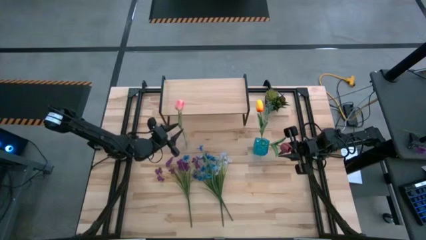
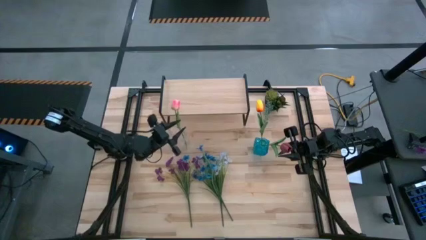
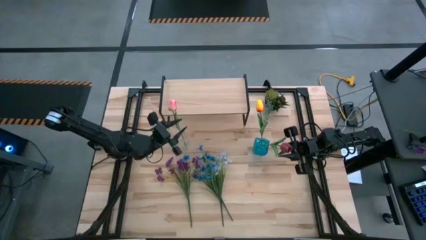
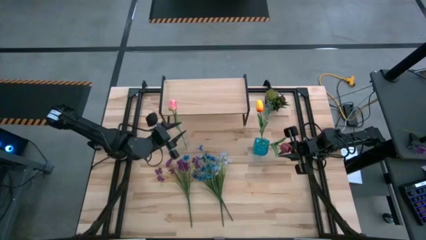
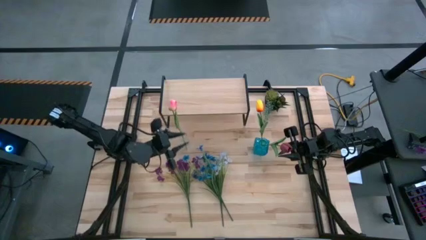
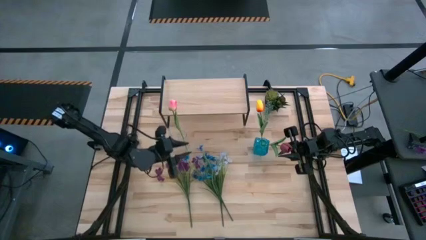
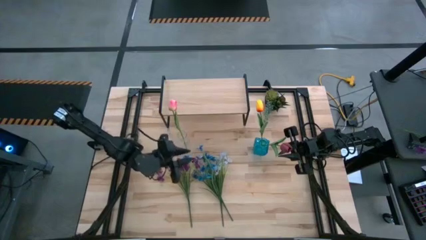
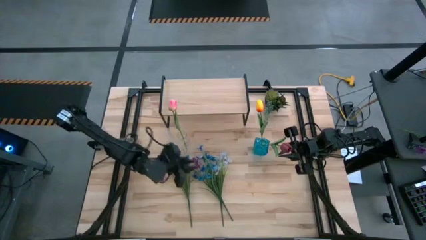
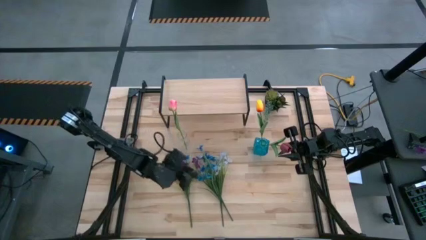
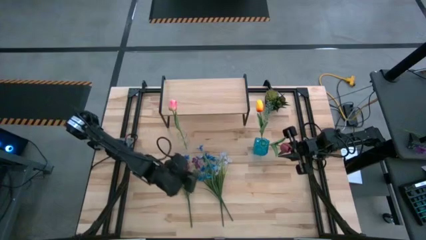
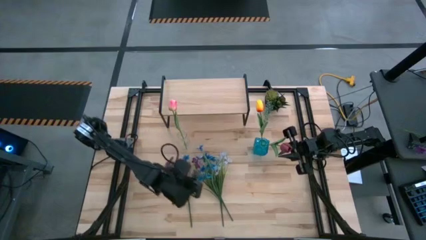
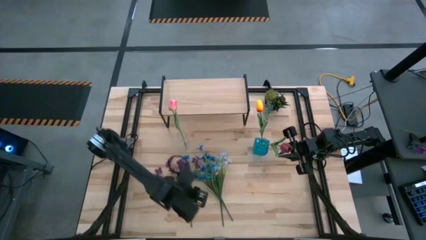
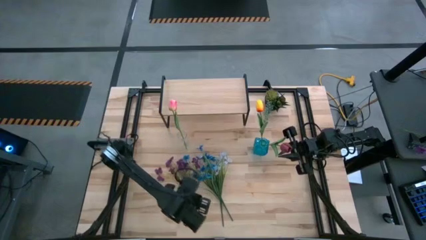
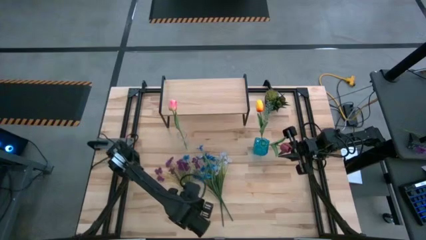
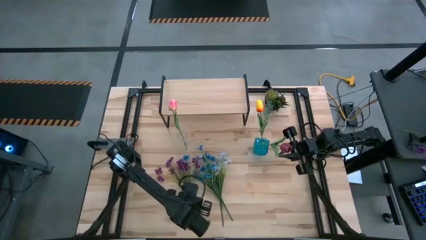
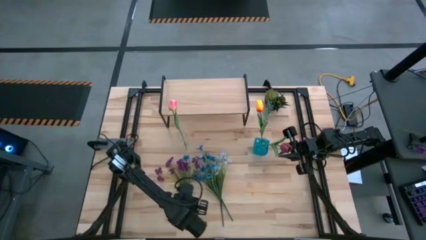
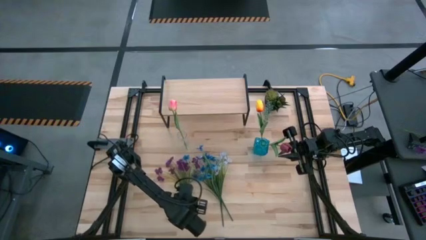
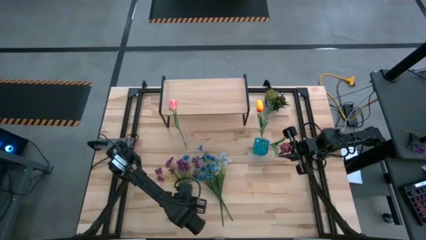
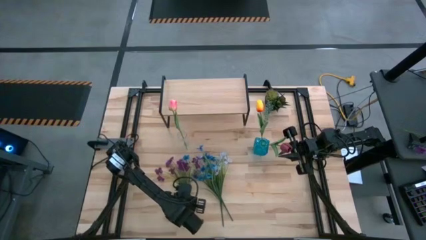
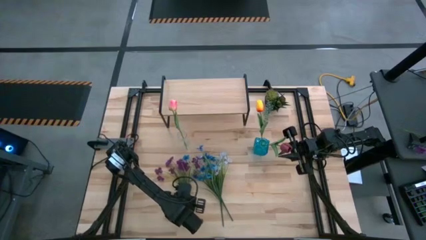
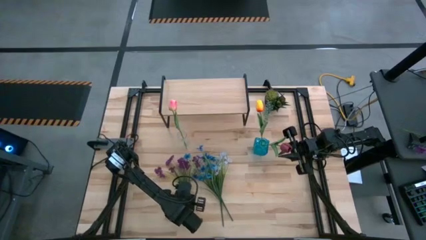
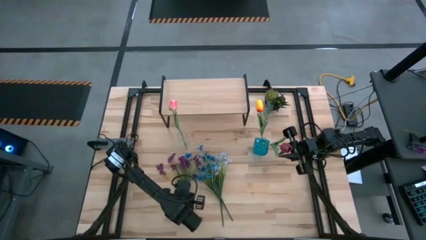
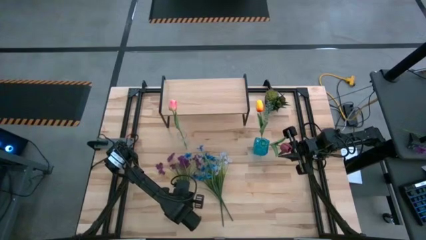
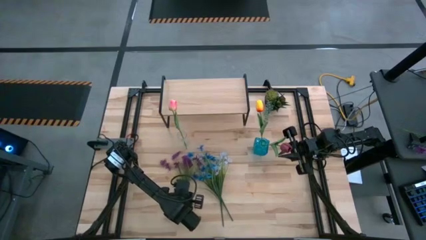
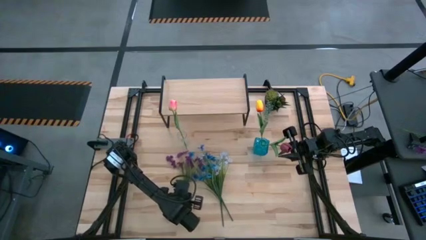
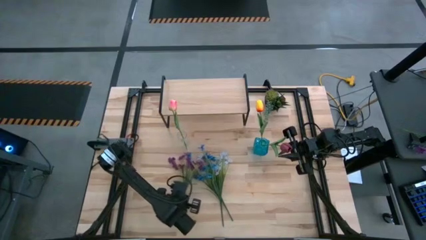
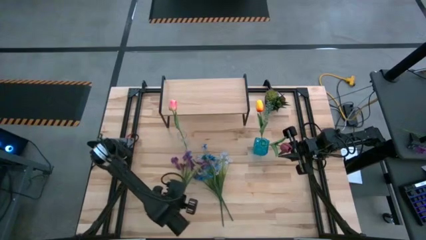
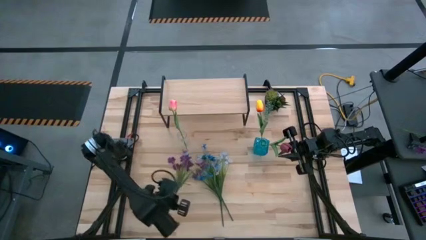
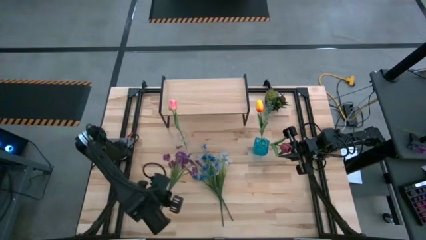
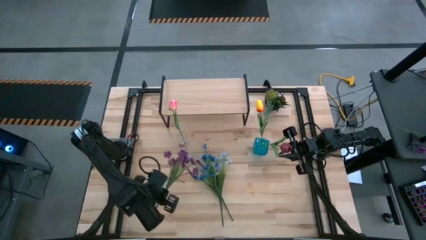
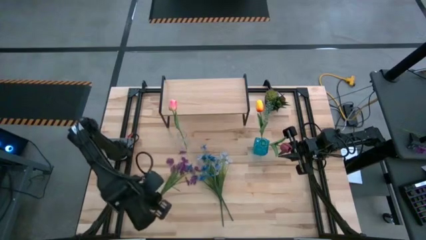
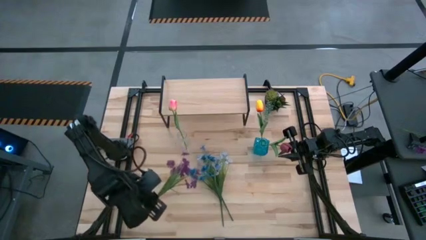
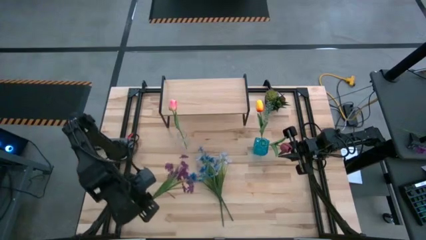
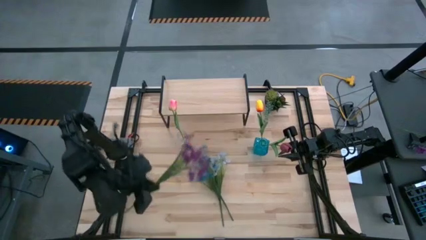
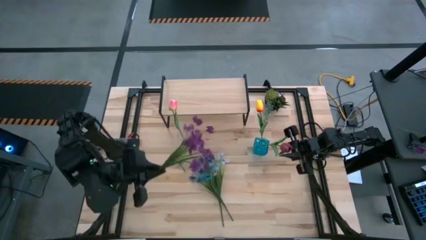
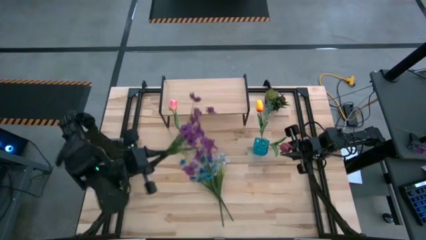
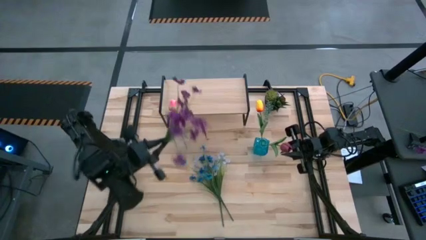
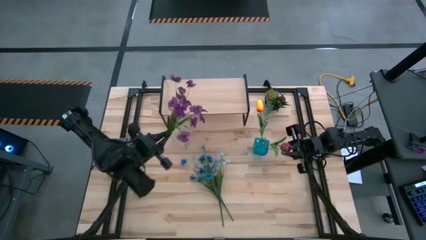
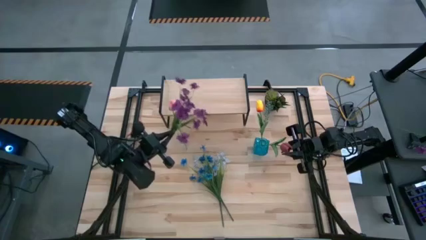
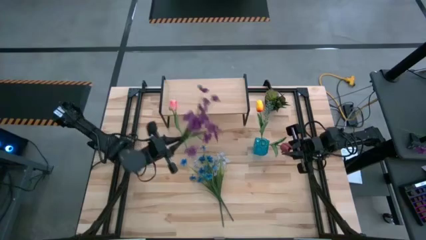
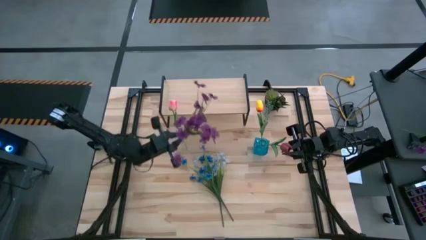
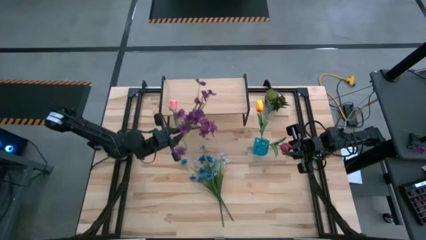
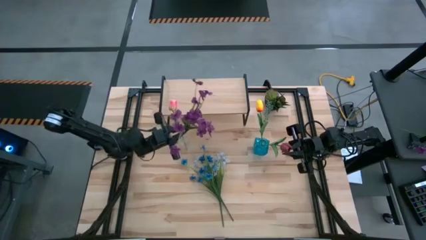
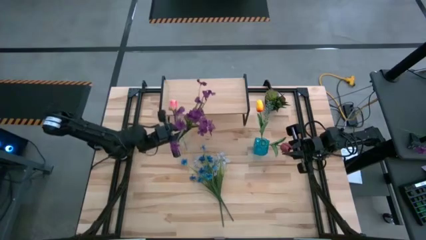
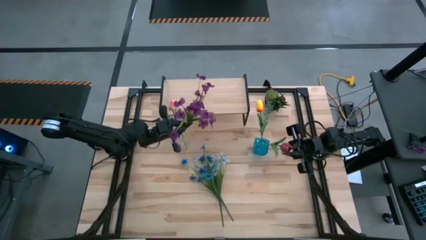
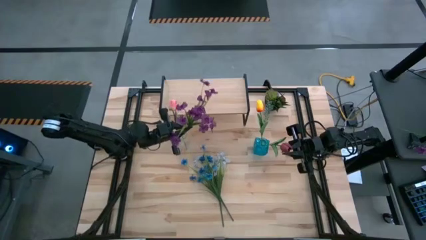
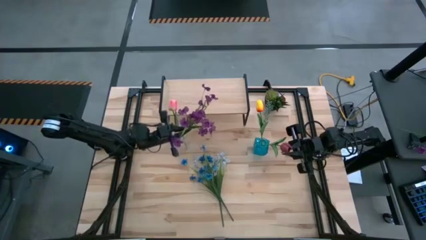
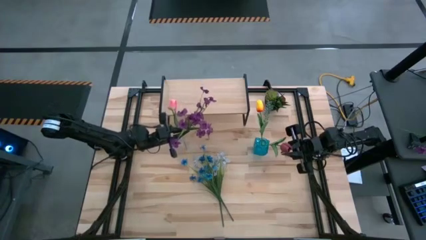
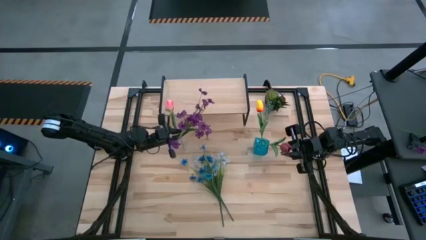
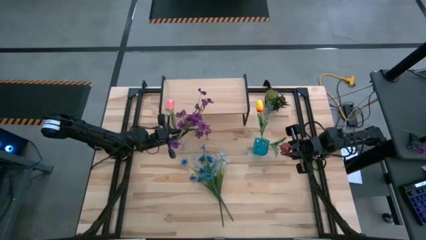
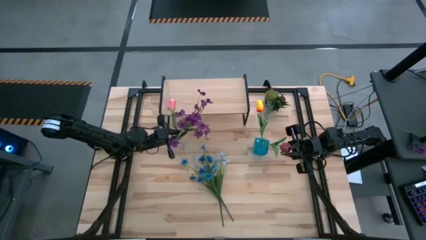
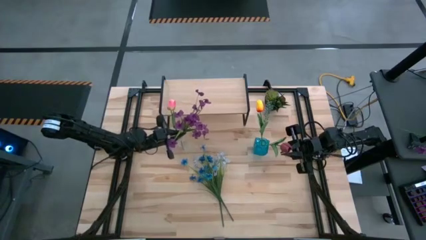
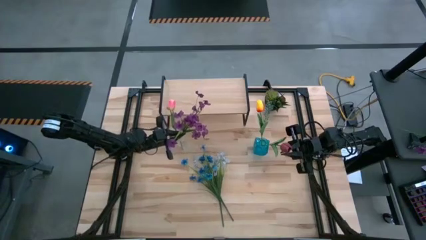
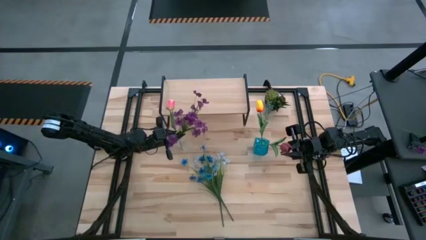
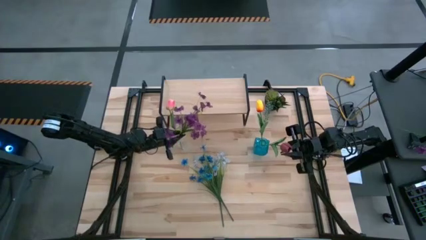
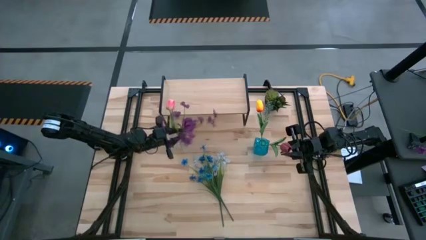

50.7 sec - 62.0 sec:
Task: Pick and place flowers into a vace then onto a shelf
Put the purple flower into the transparent vase

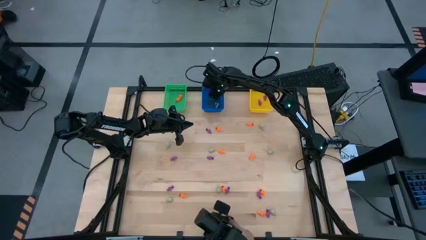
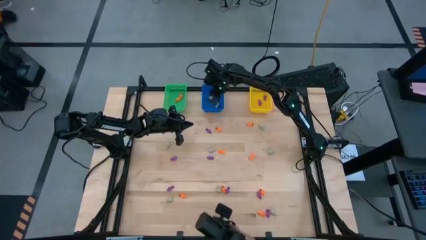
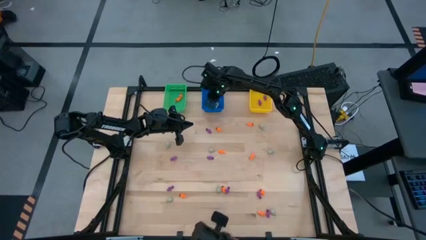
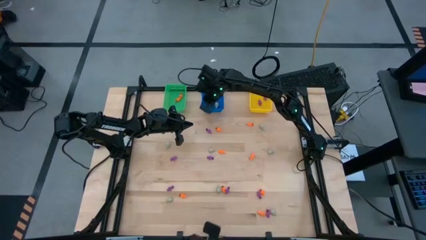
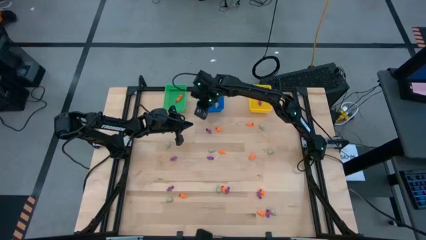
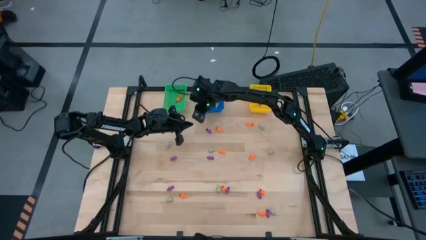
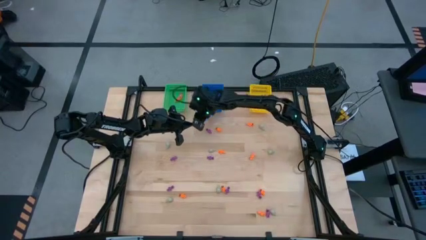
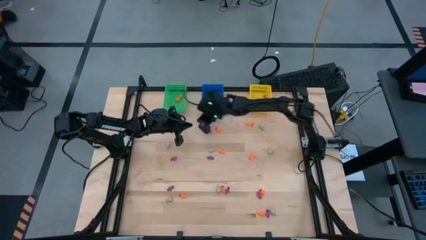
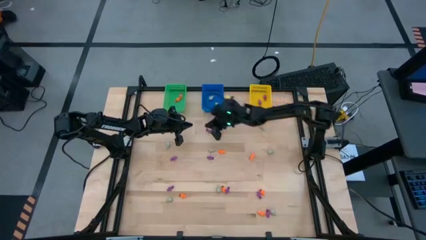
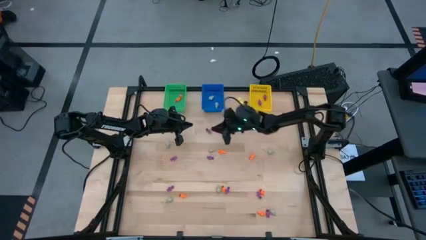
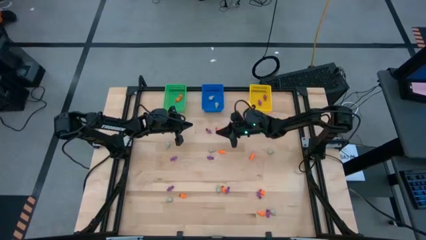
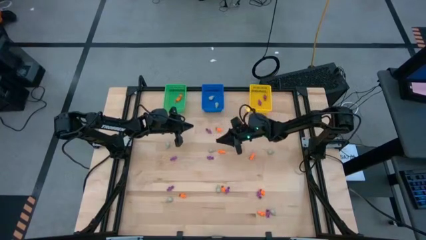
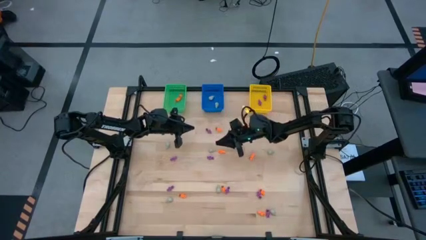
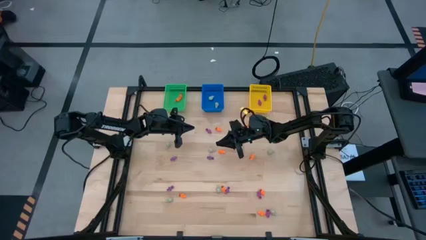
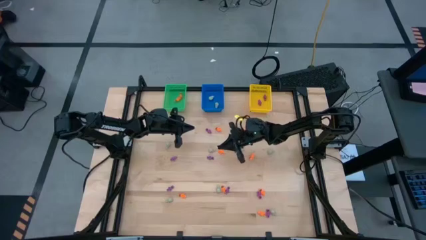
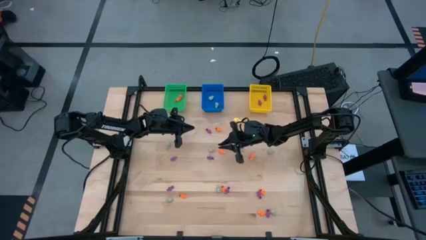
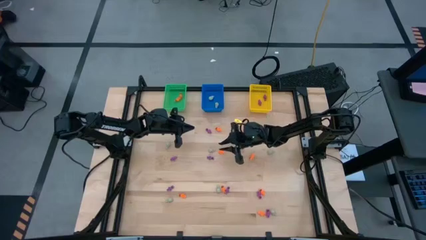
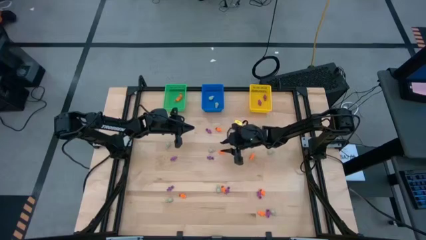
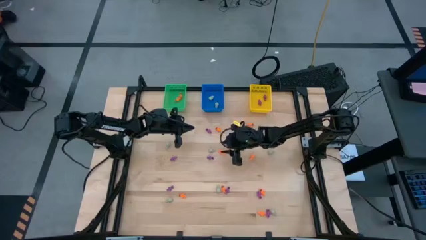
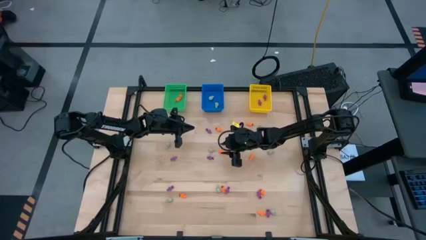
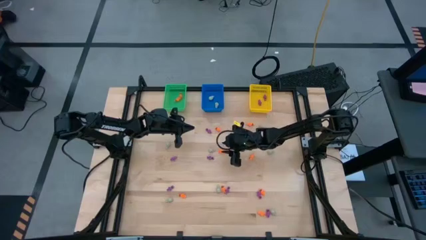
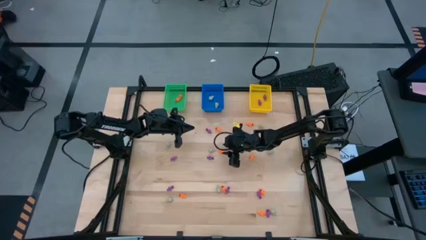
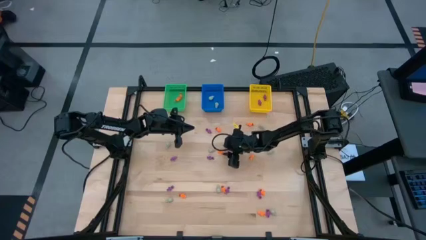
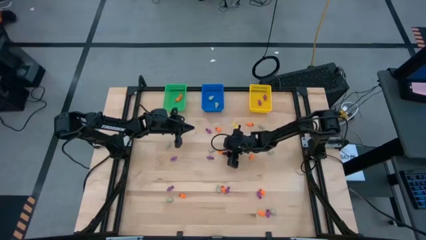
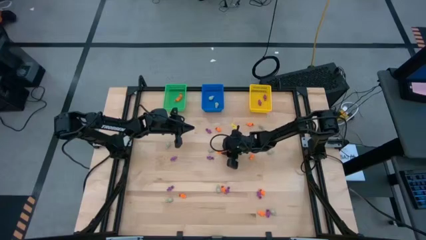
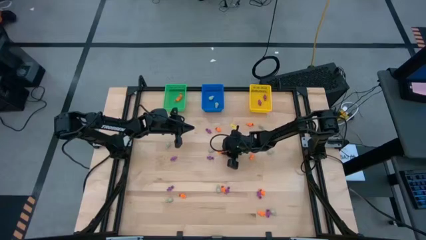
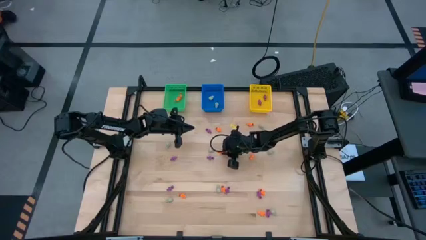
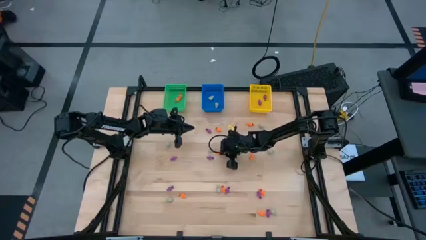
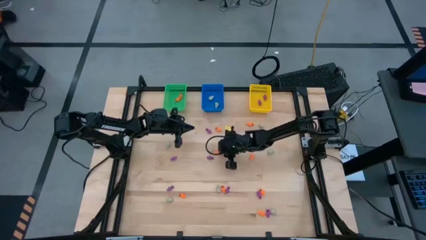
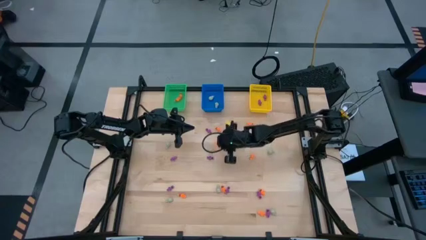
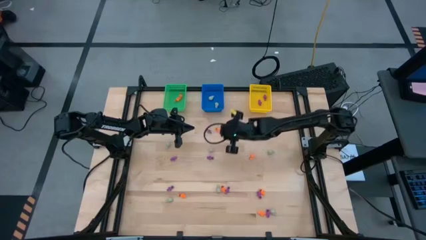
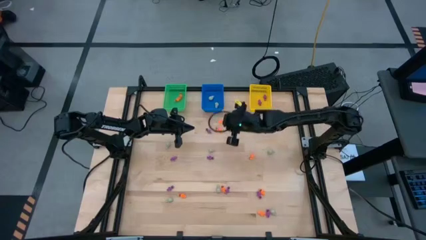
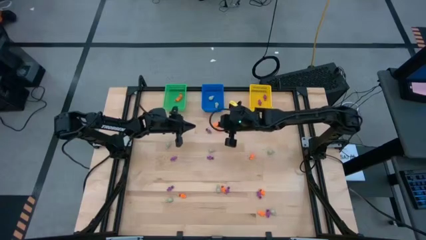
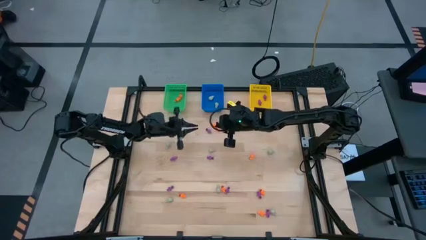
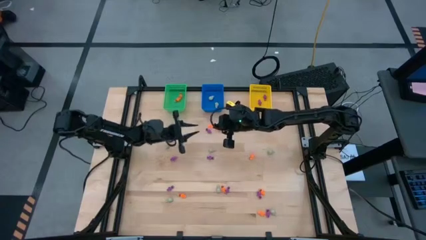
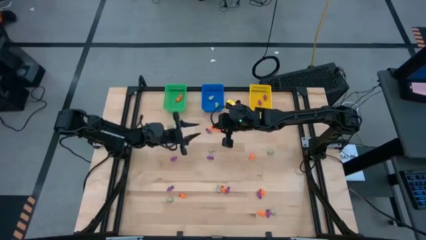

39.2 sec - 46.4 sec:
Task: Sort Halloween decoration
Put the orange skeleton toy into the green bin
